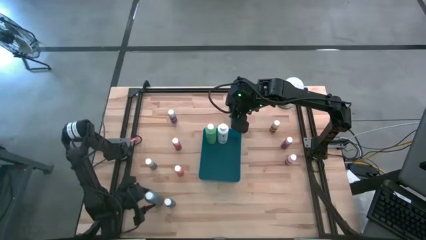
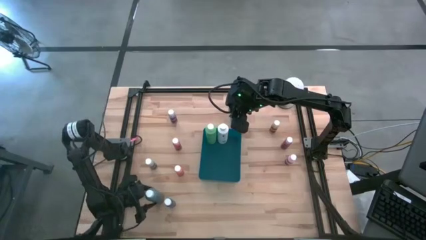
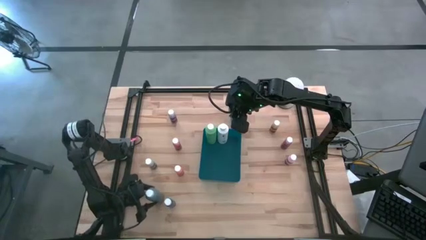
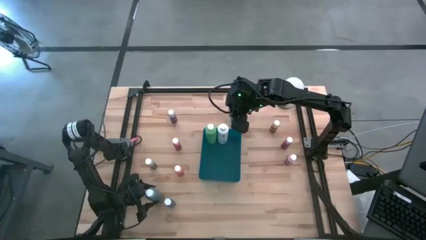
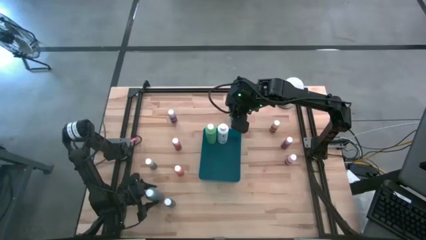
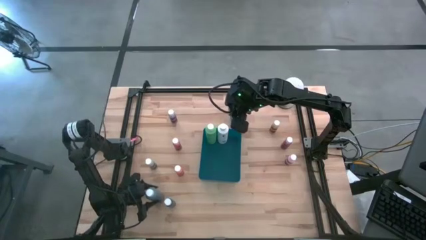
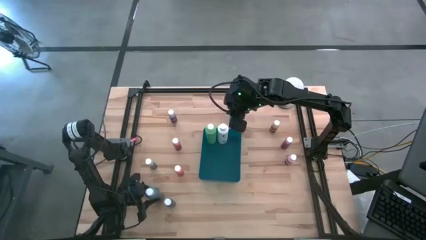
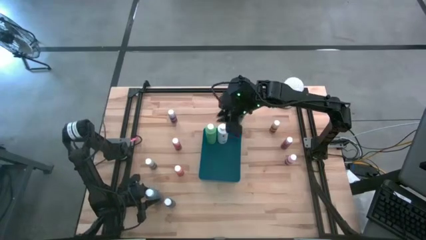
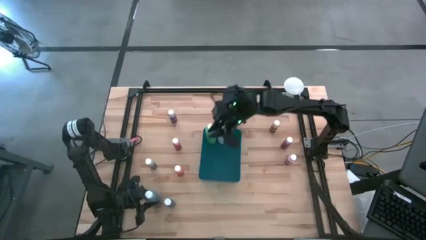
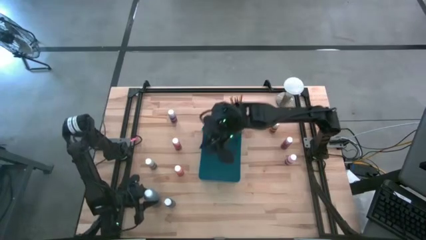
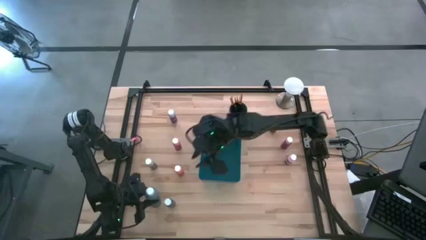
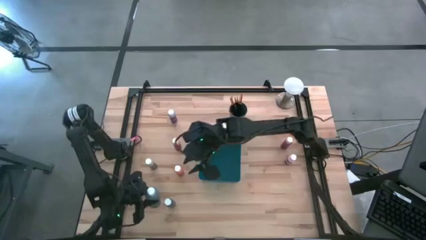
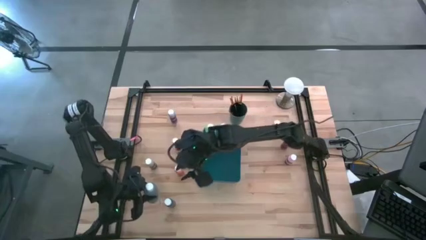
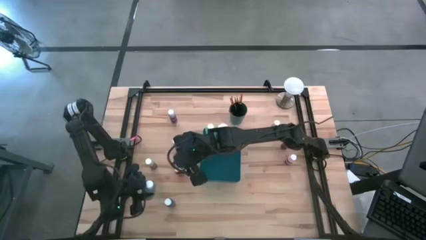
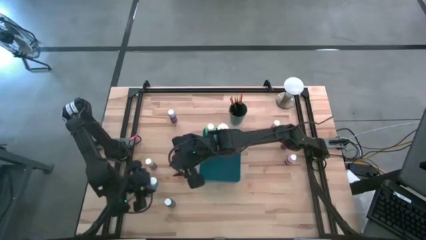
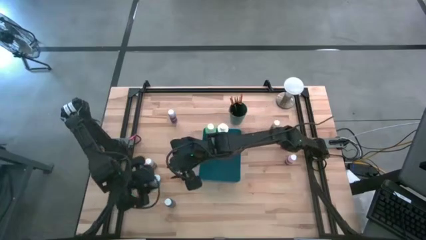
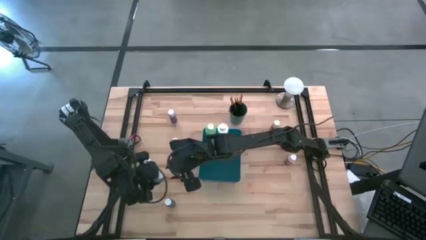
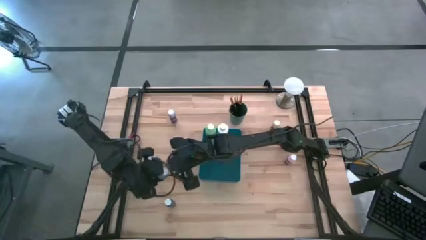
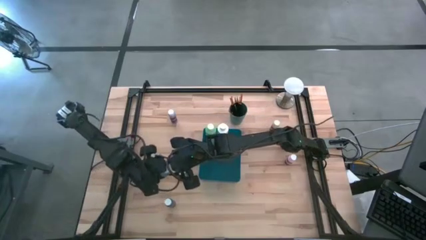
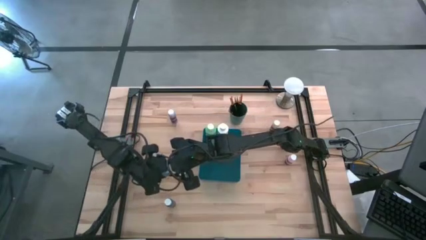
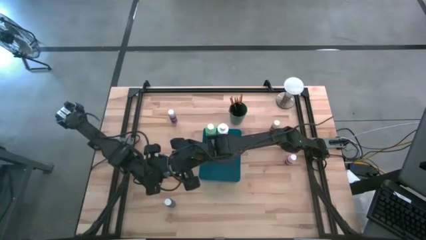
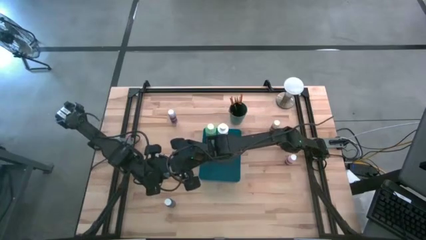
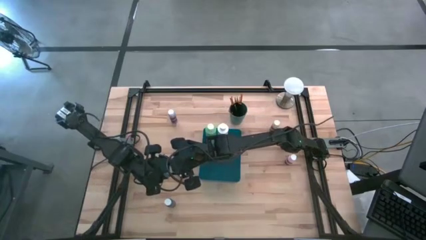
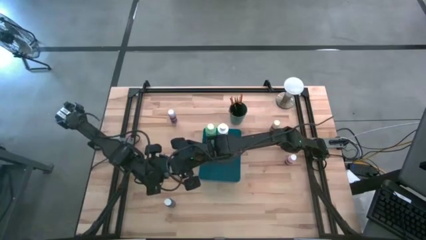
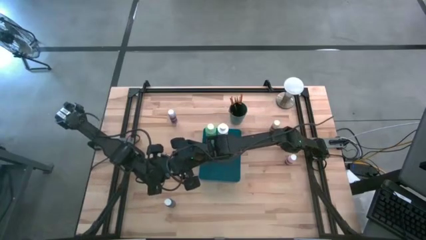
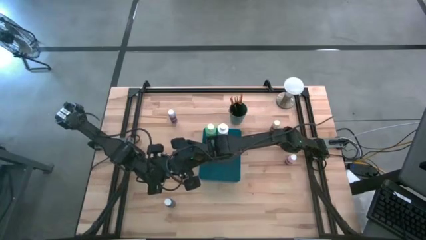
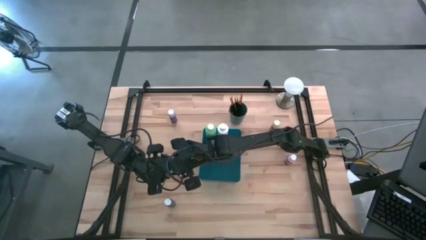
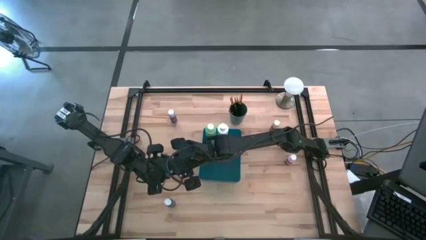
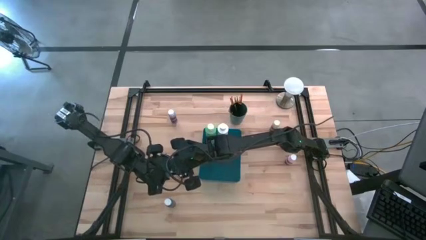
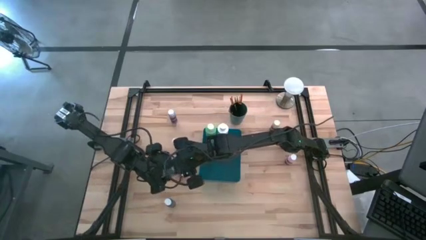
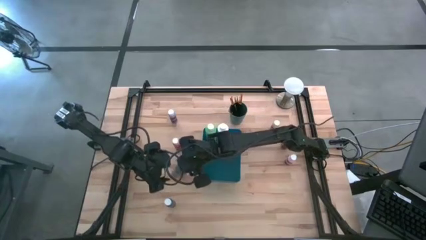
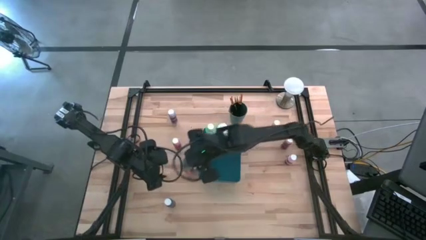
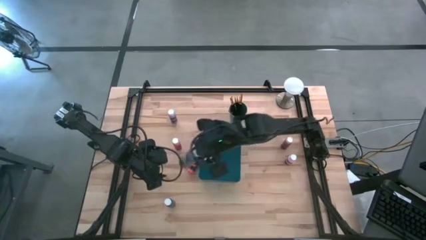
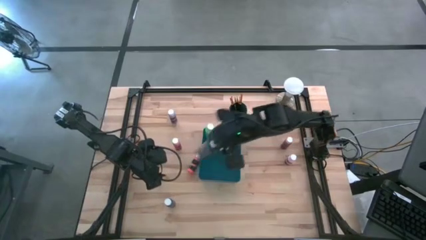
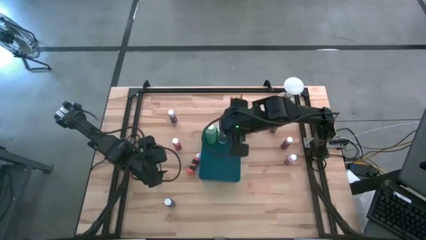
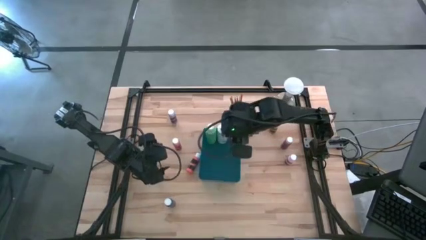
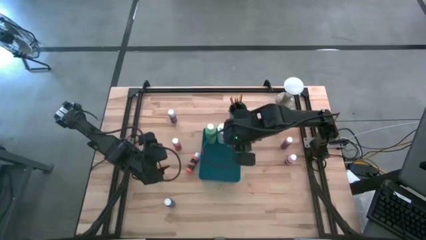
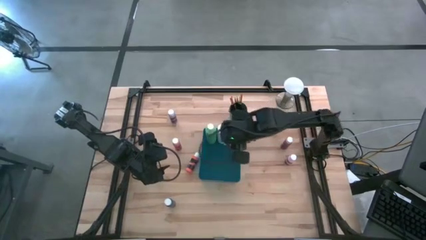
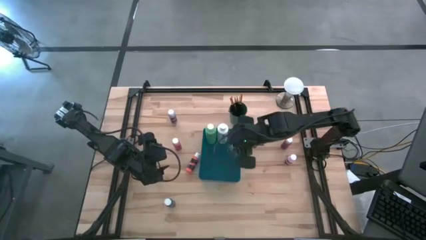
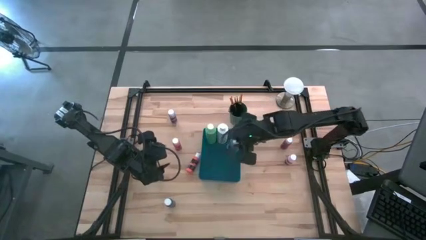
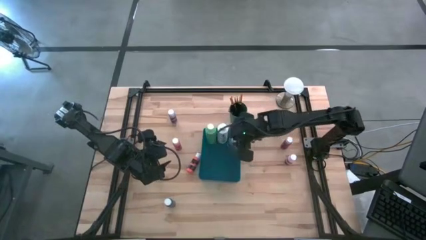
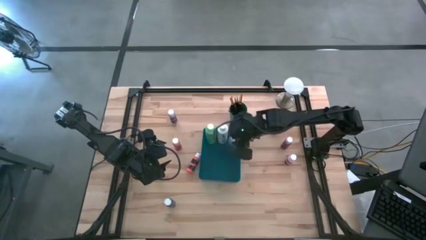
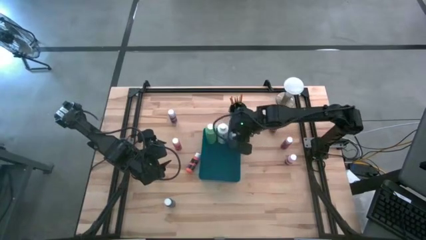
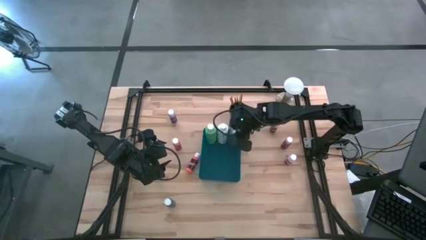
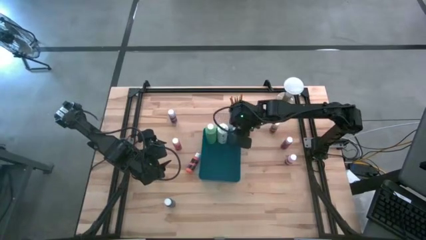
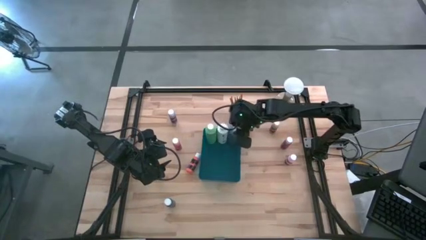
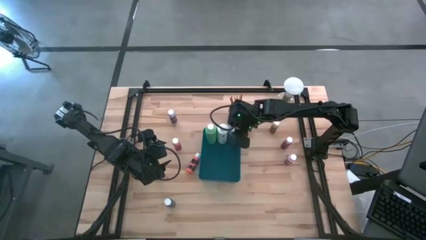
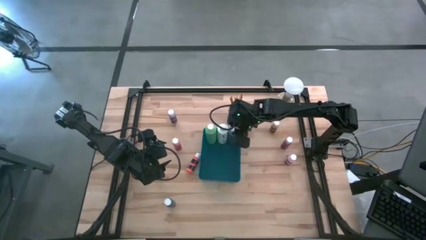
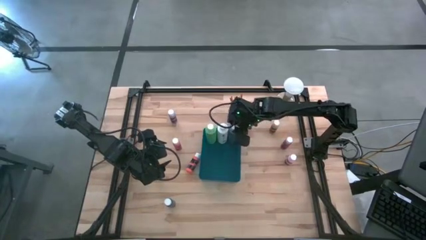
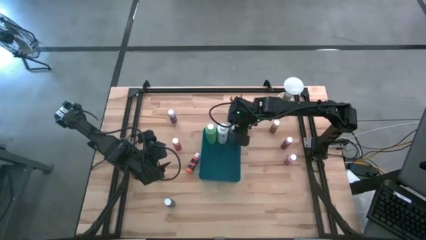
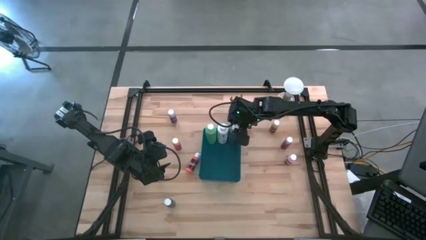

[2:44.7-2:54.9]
Task: Pick & Place Paint Supplies
Put the large blue paint bottle into the blue bin

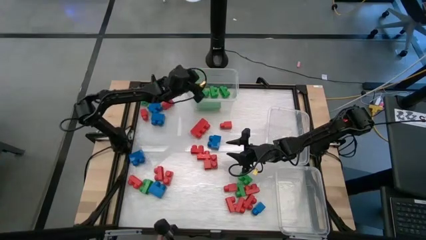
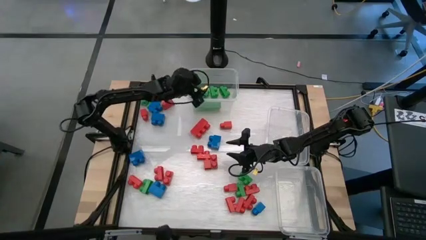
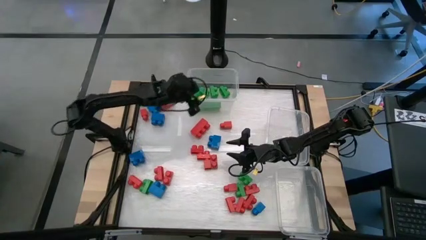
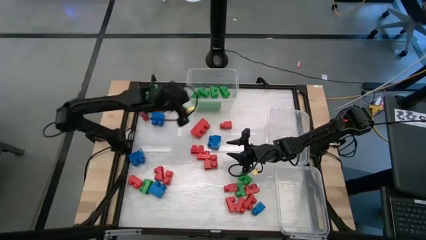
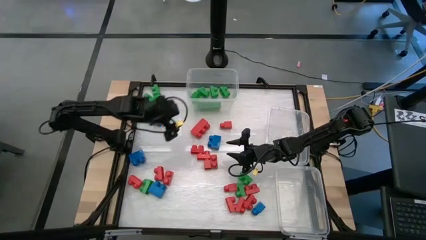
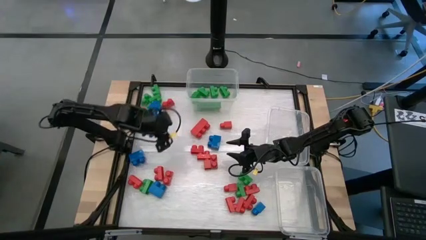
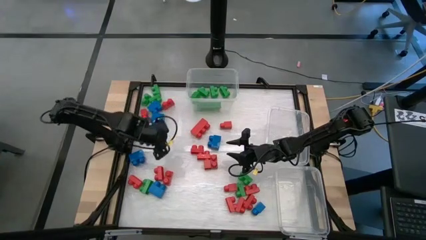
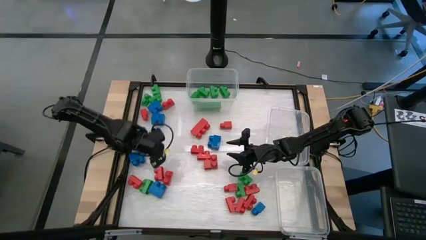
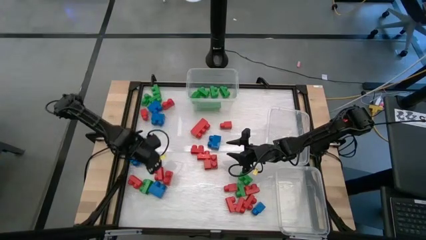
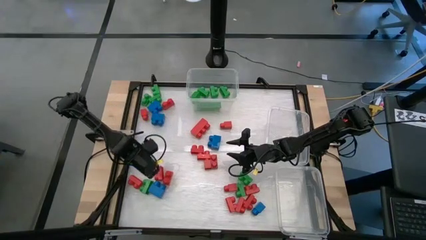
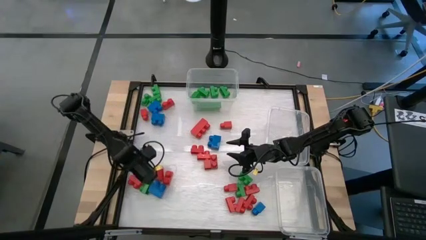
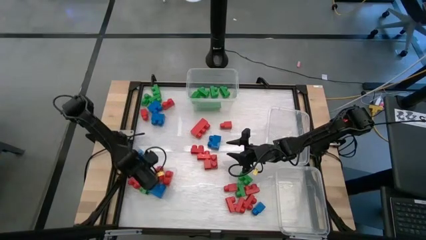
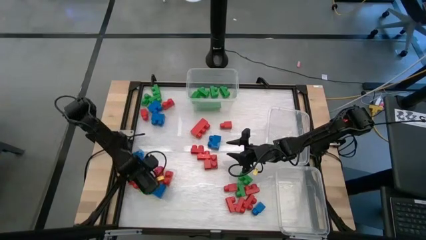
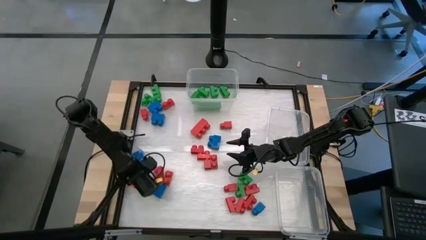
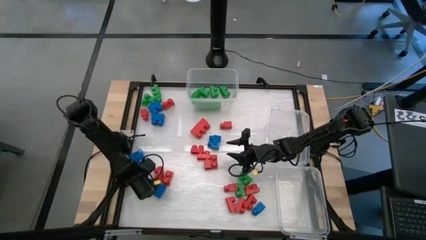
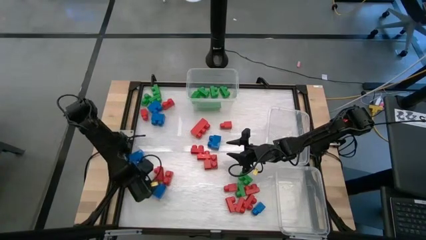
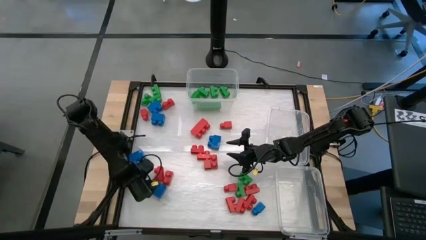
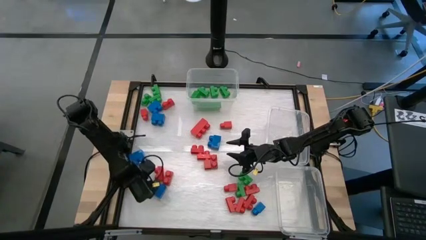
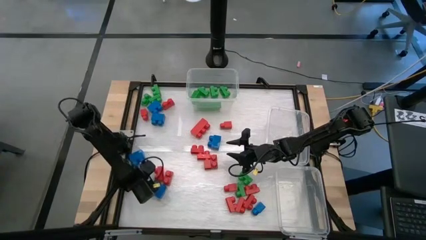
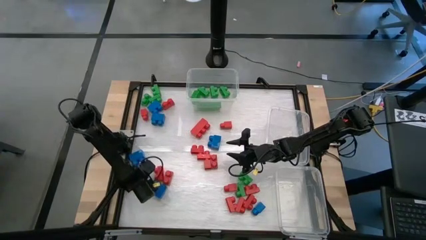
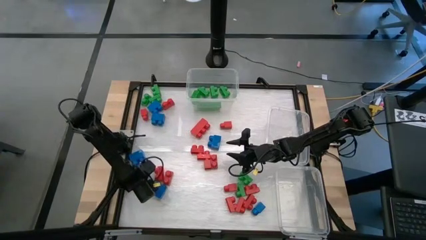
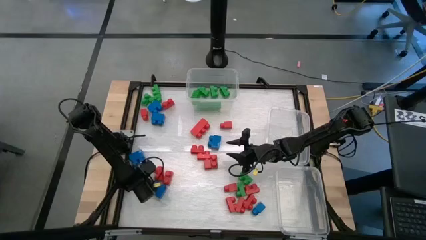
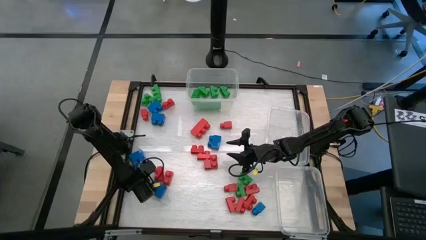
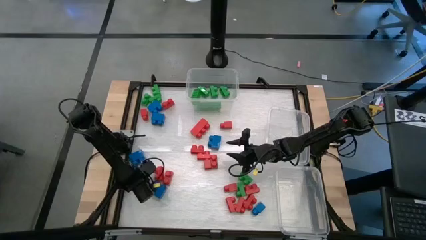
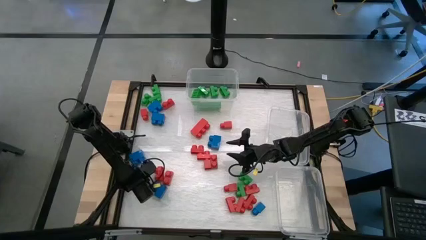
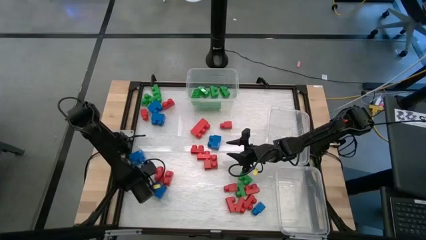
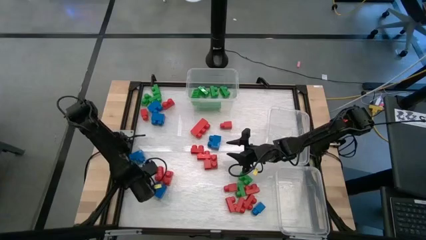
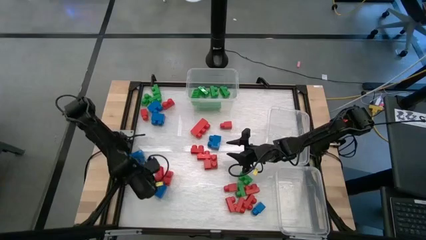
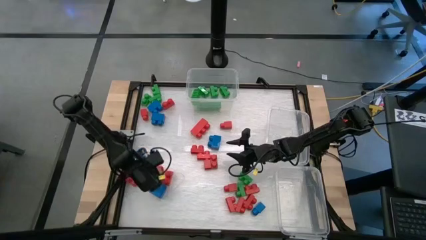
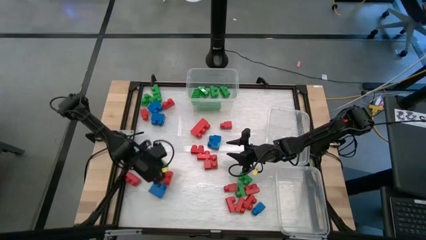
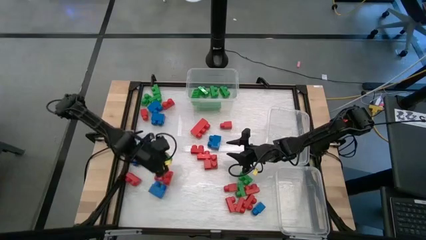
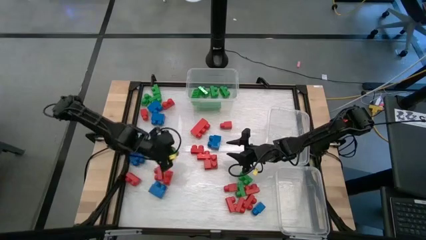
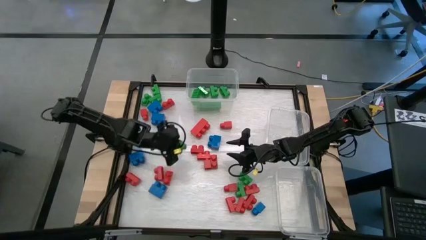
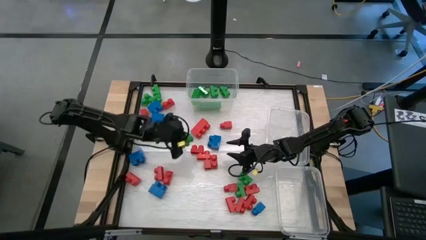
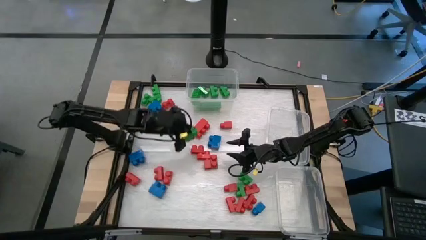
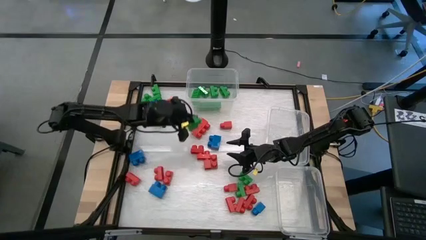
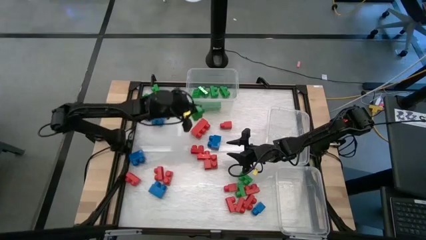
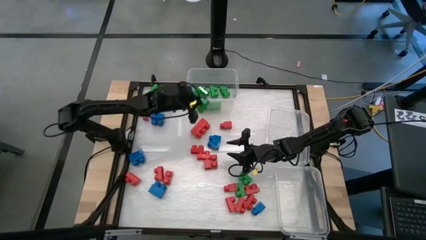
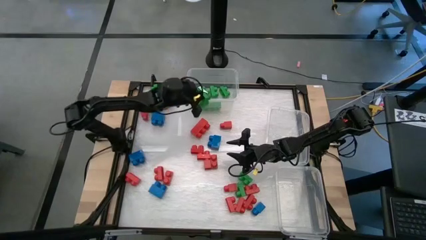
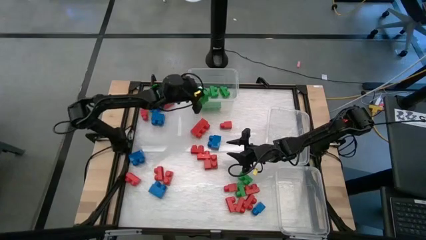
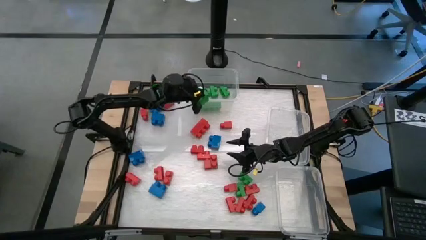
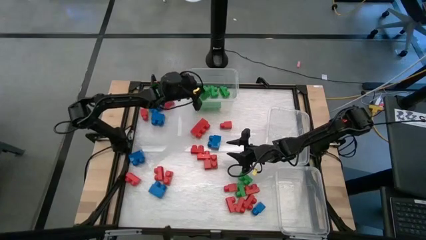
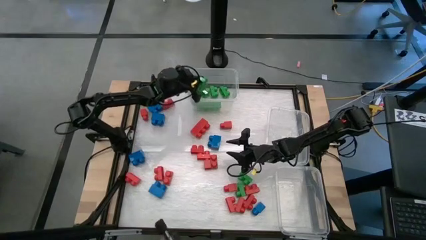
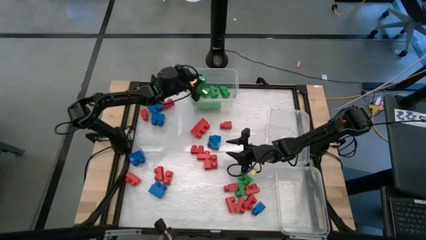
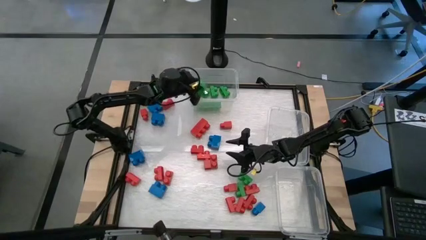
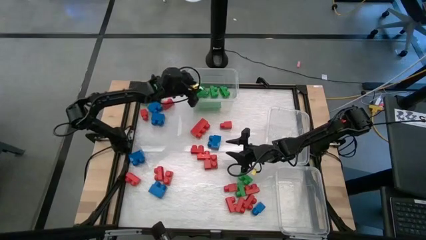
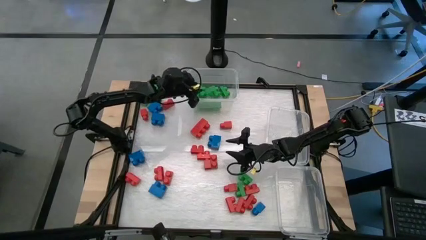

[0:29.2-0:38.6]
Task: Sort blocks
Put the green game piece into the top transparent bin
